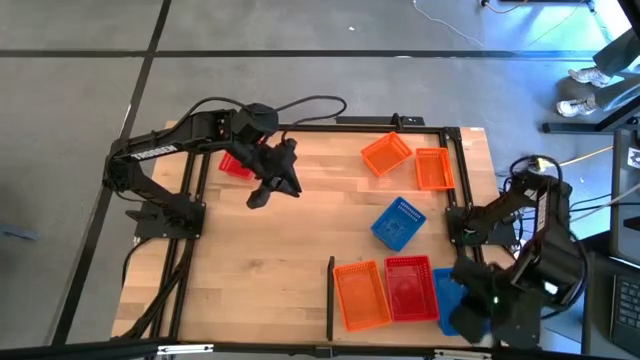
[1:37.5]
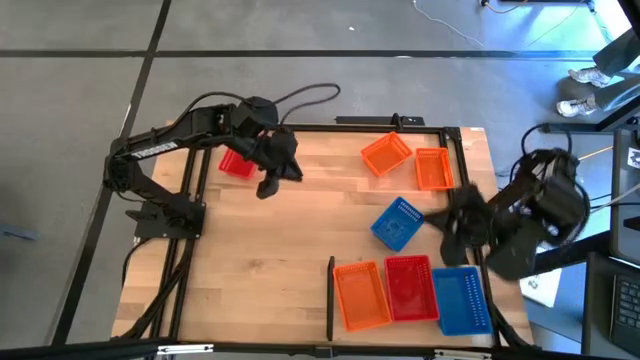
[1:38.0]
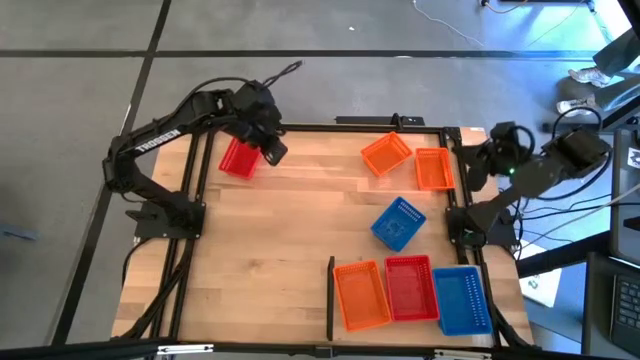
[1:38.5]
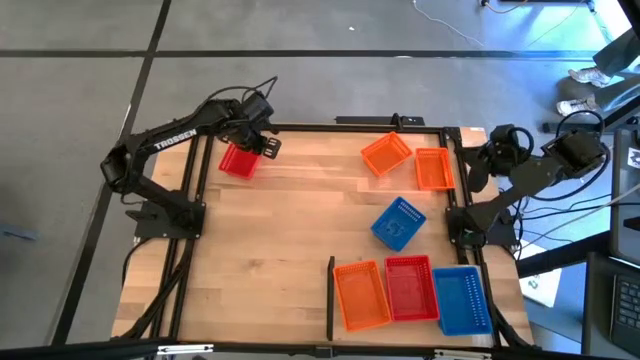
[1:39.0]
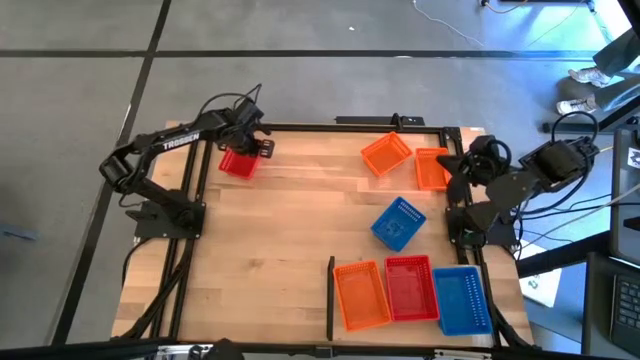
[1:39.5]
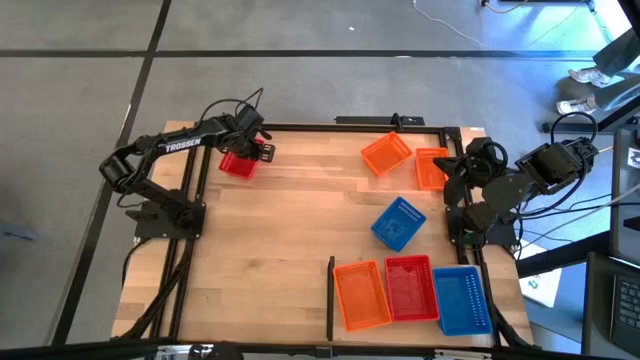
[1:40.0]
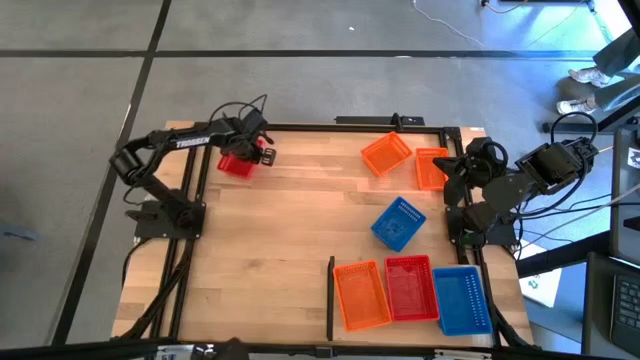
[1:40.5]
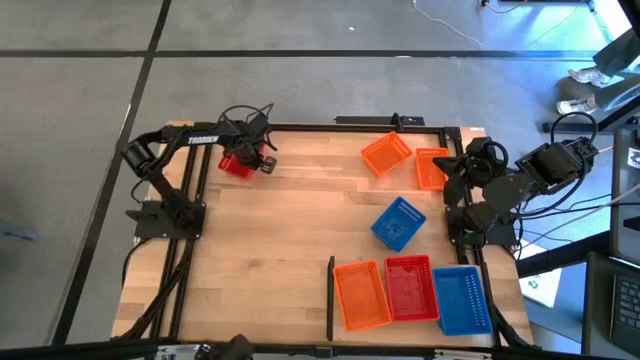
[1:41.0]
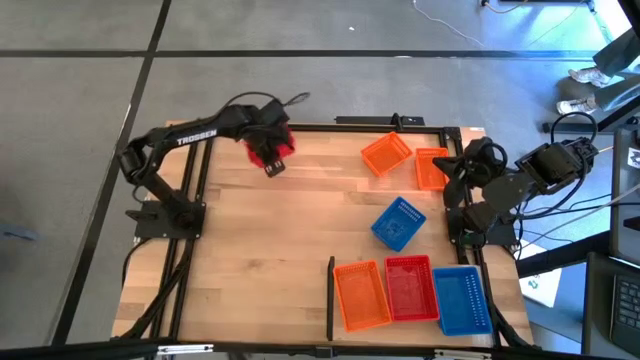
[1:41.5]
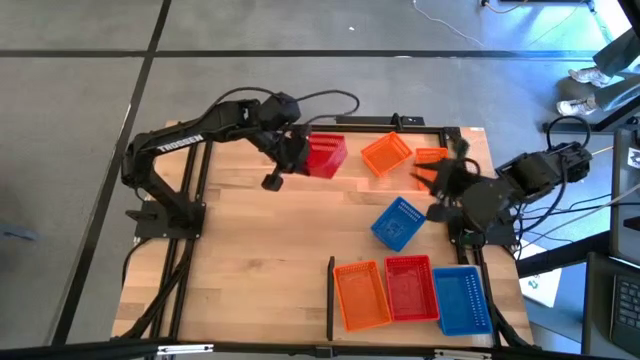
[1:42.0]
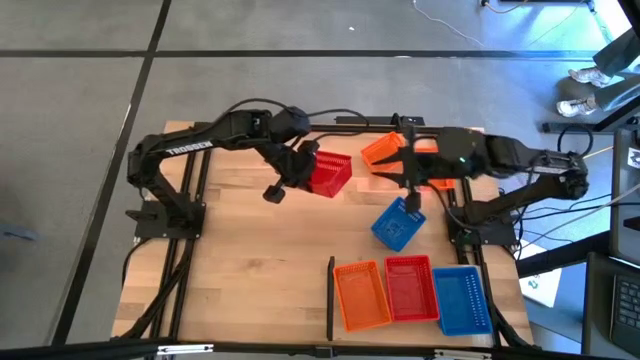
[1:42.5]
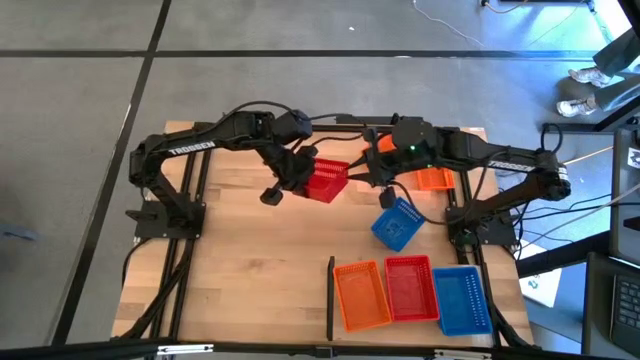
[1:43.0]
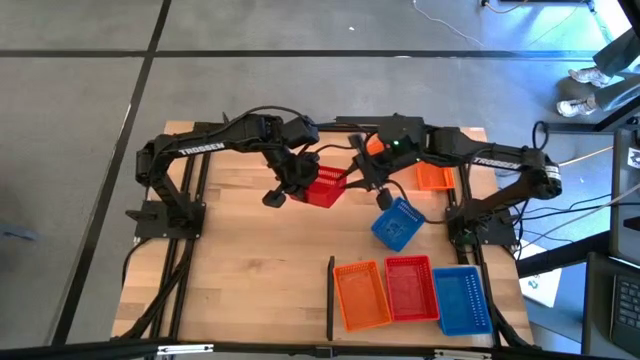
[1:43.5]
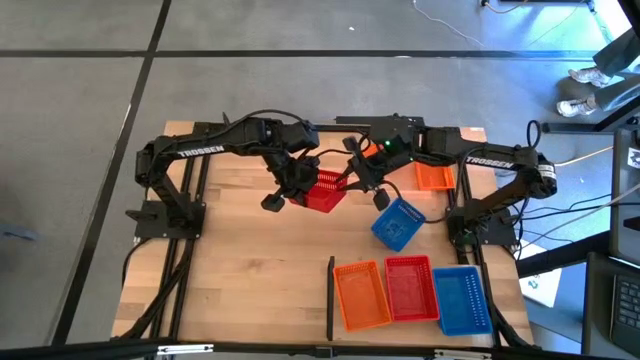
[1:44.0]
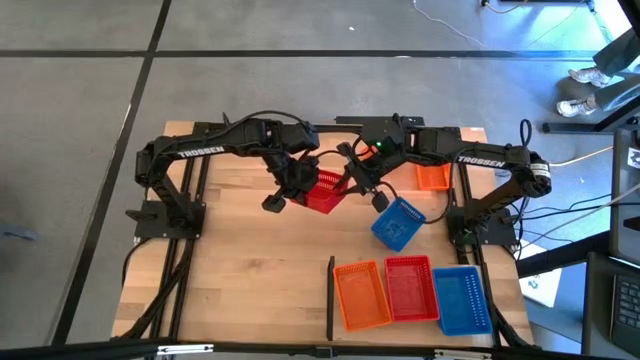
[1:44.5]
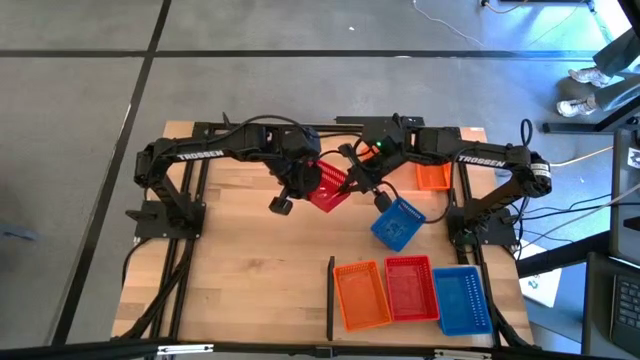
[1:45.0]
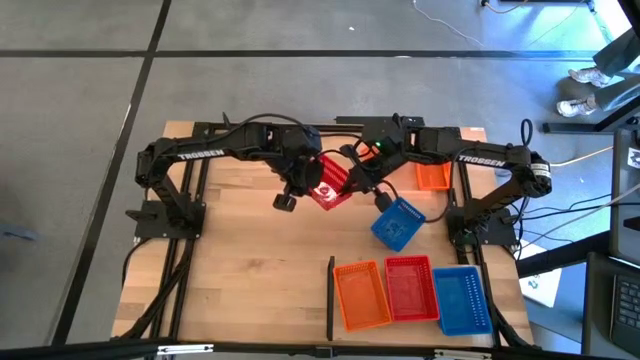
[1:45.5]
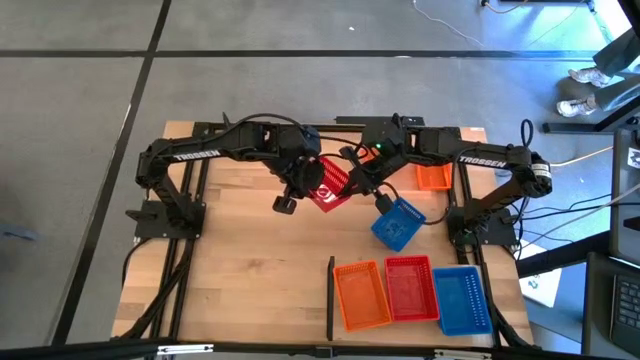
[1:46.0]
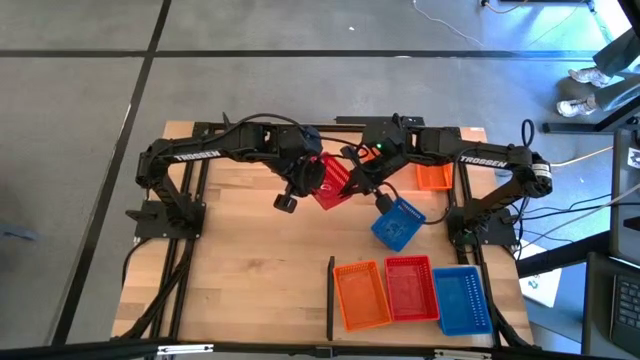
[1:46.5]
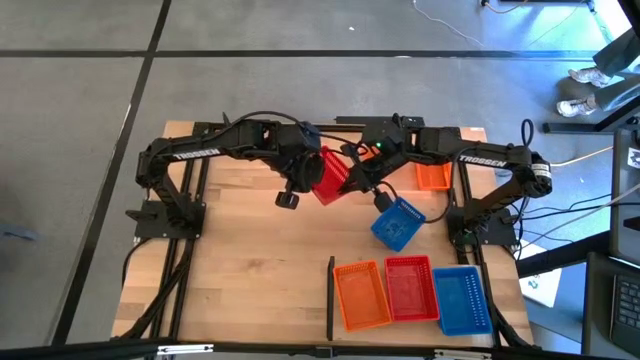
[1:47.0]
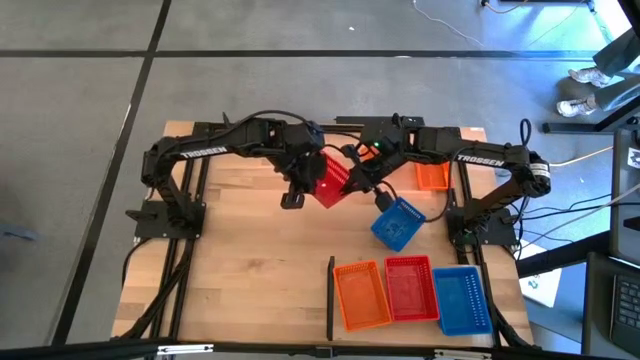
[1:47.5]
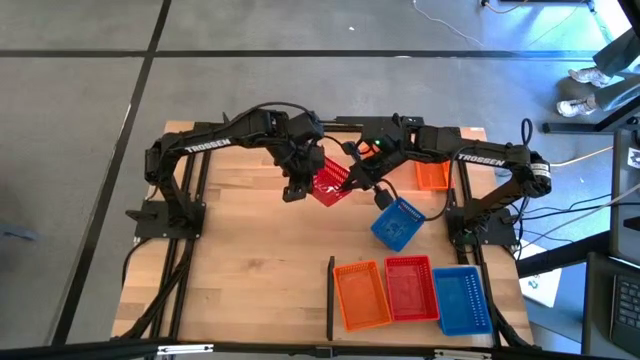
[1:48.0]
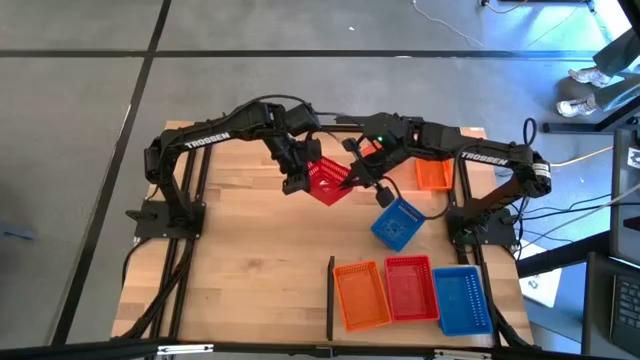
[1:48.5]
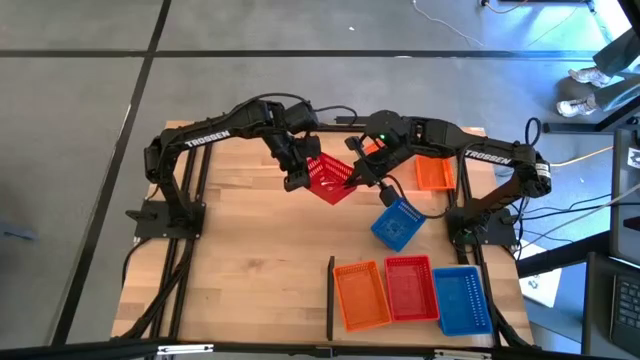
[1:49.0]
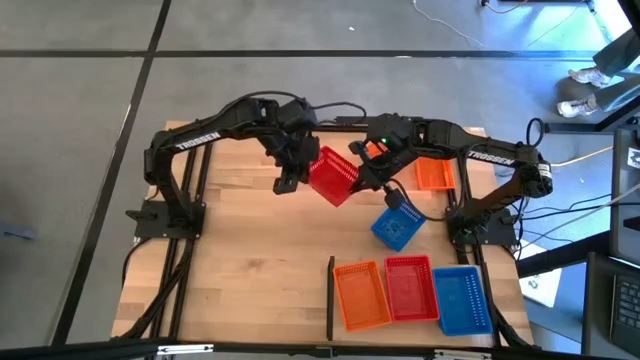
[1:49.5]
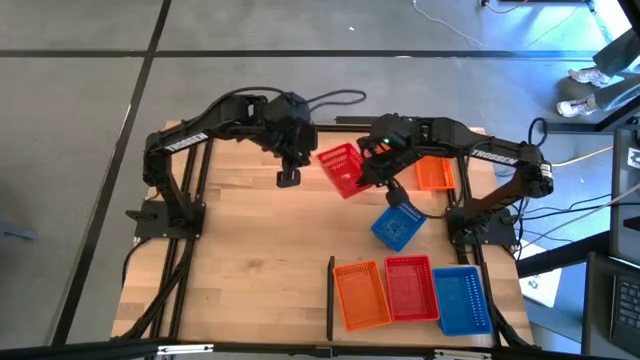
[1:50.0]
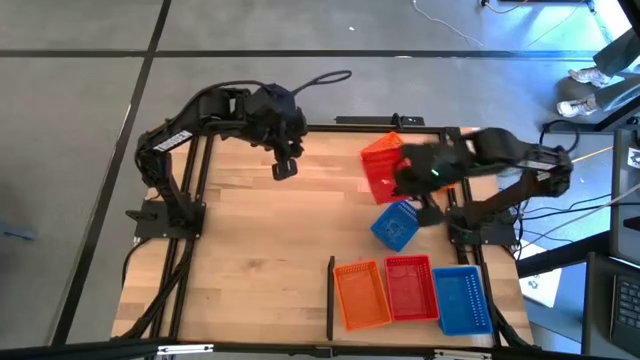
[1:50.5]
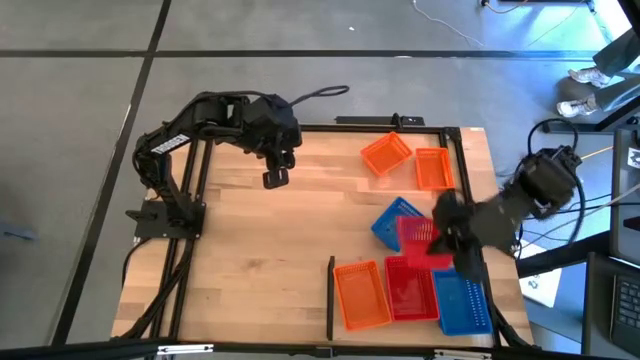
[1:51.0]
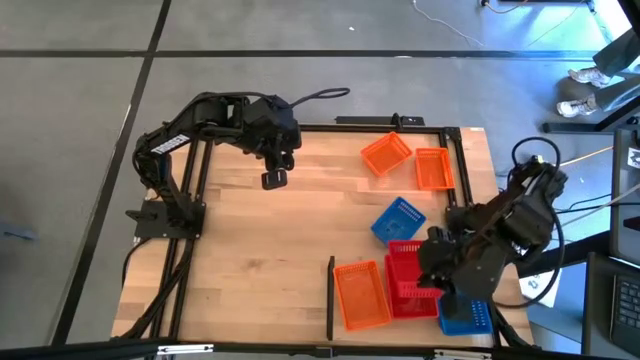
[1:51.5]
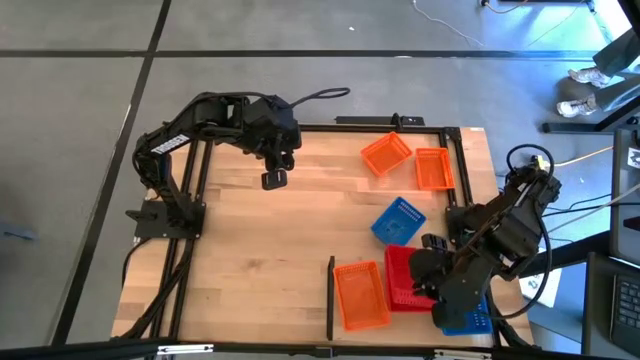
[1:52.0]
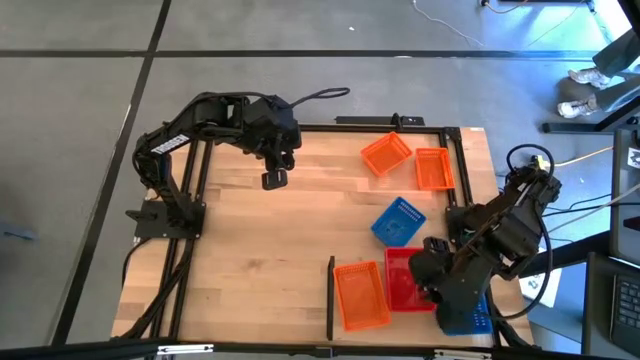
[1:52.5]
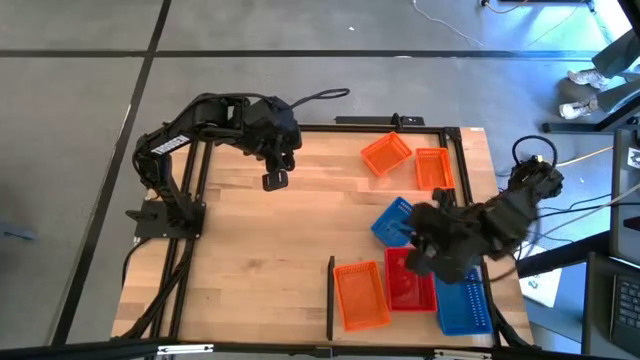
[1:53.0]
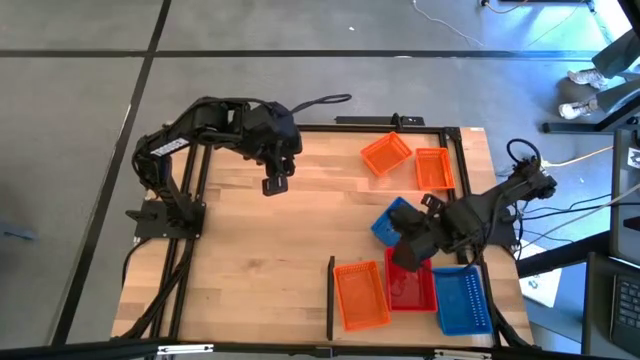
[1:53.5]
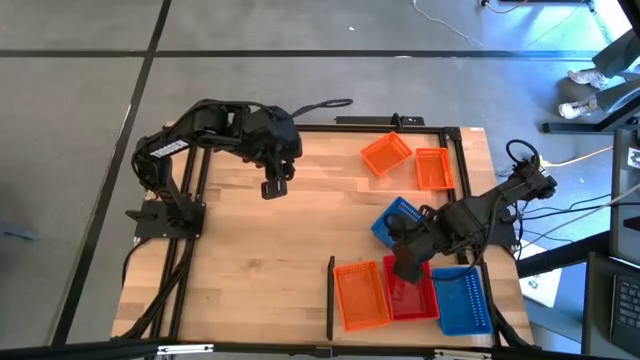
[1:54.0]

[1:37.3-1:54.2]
Task: Stack baskets on shelf by color
Stack the red basket on top of the red baskets on the shelf

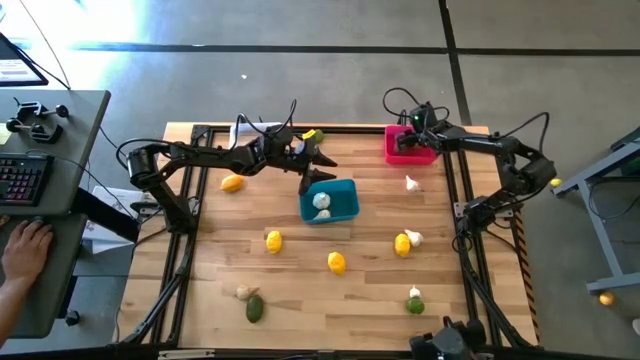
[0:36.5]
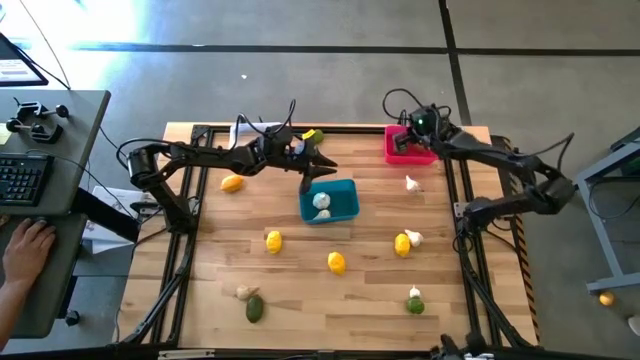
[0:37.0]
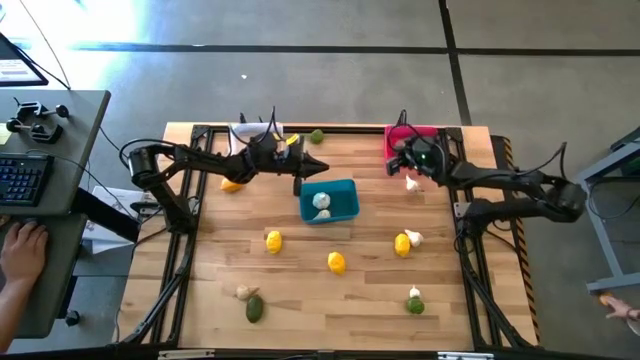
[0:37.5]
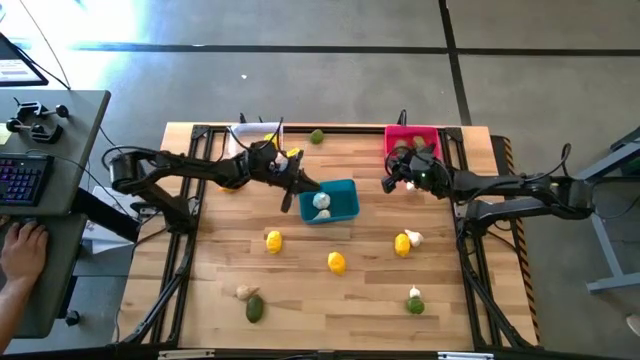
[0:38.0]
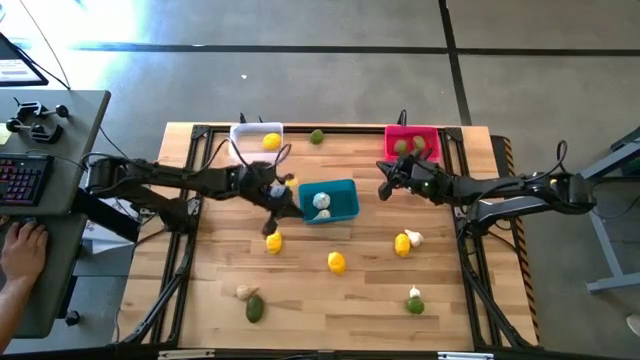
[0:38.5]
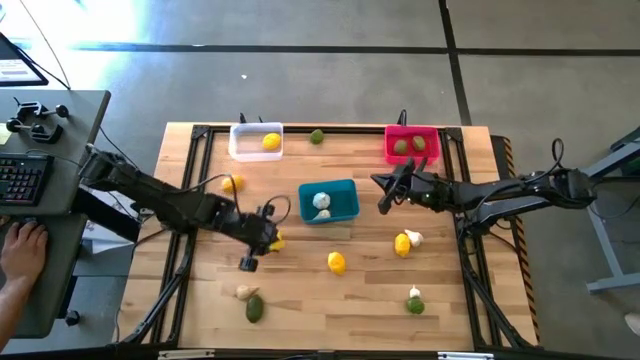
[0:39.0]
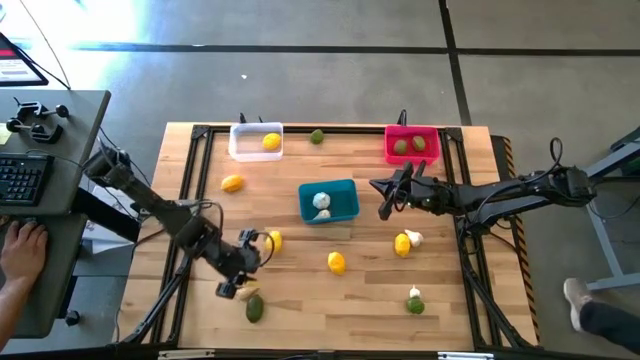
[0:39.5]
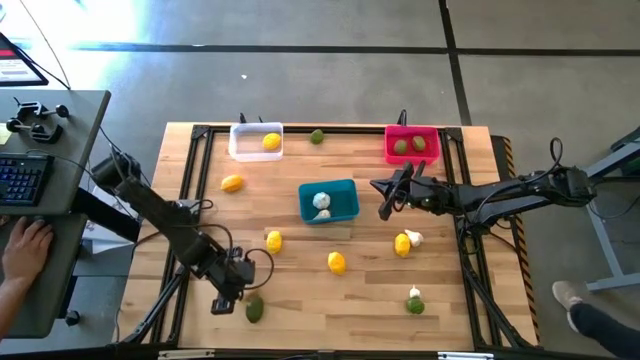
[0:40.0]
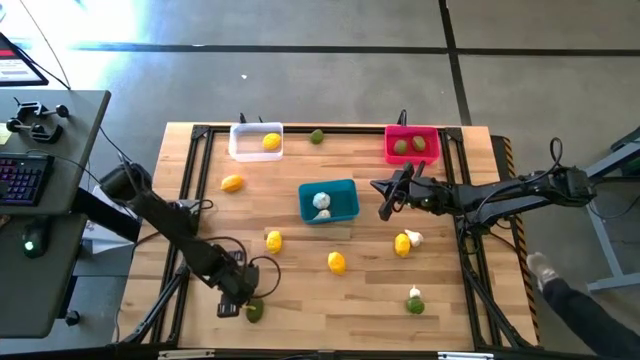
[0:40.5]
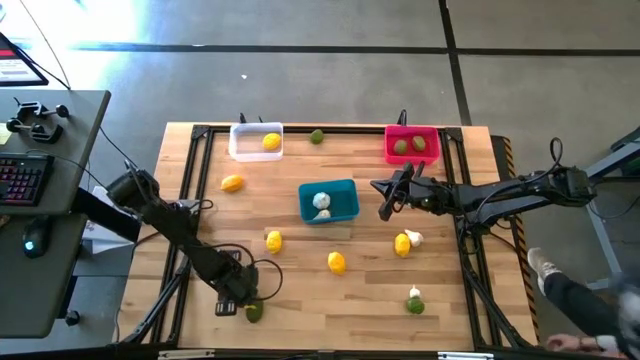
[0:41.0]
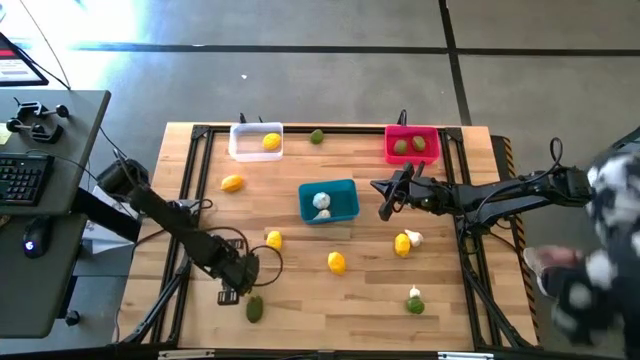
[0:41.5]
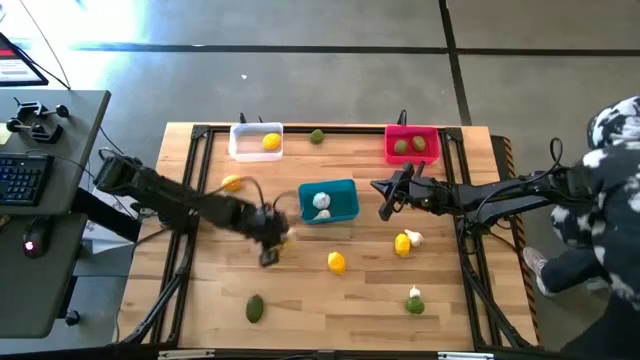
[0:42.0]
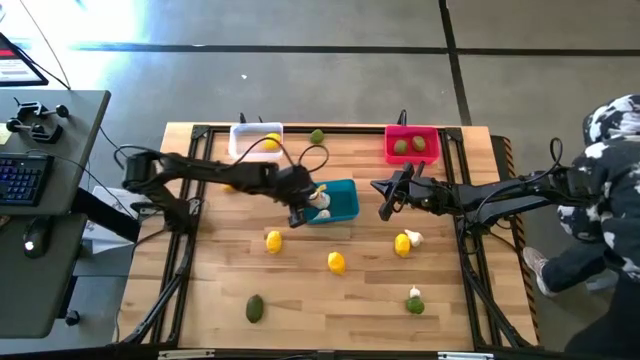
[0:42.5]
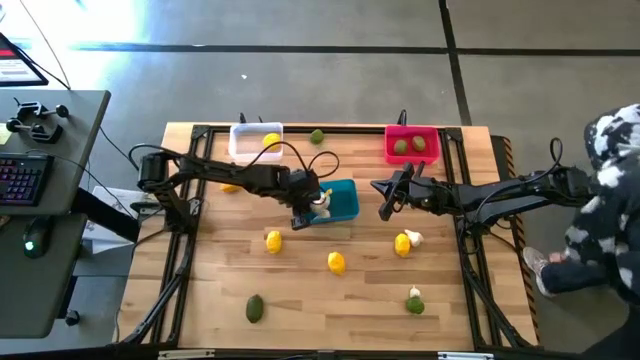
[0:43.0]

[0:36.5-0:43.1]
Task: Sort produce into baskets
Put the garlic into the blue bin
